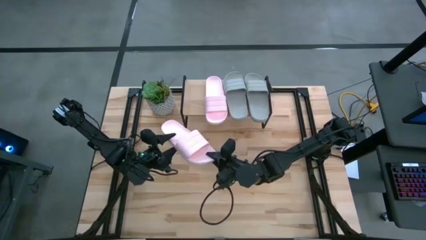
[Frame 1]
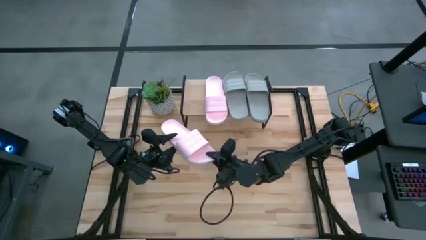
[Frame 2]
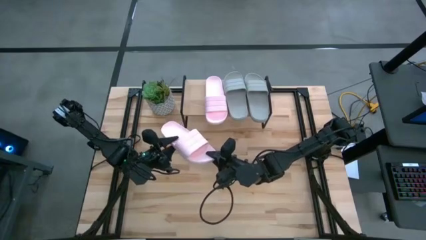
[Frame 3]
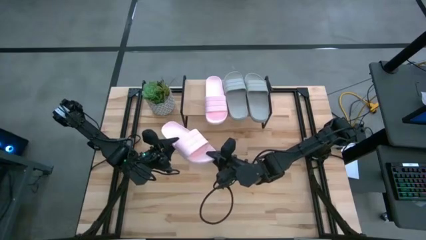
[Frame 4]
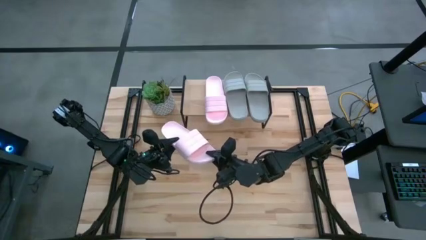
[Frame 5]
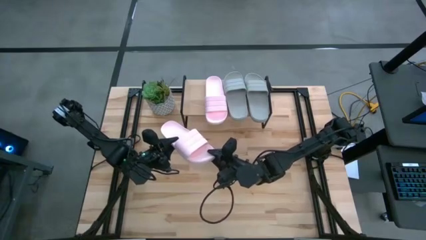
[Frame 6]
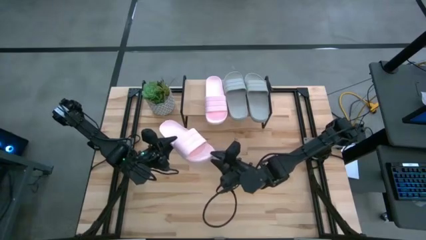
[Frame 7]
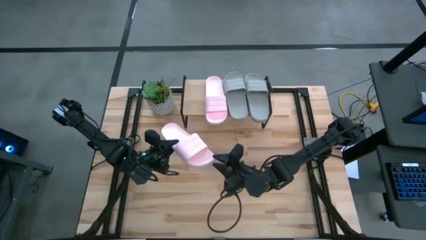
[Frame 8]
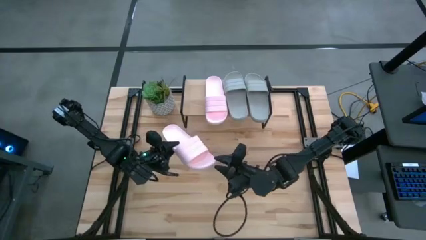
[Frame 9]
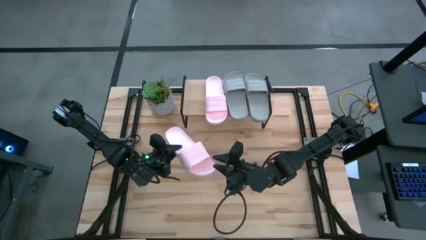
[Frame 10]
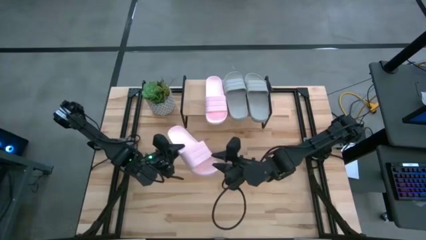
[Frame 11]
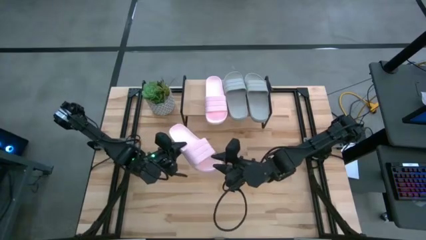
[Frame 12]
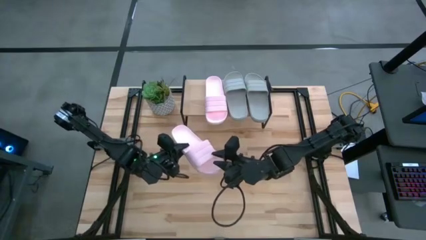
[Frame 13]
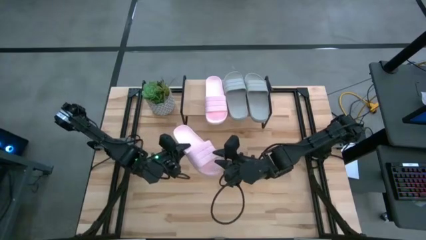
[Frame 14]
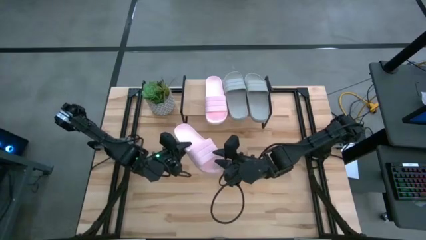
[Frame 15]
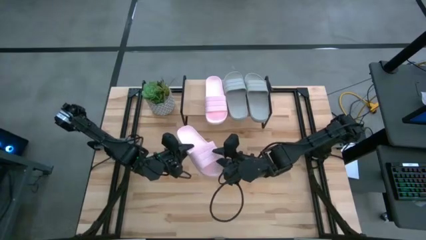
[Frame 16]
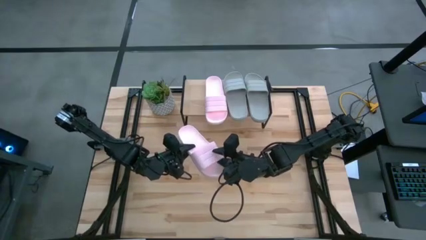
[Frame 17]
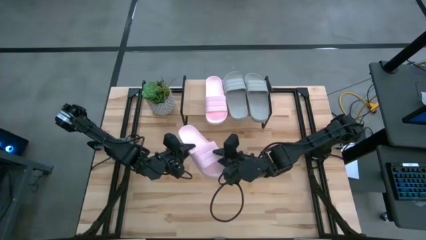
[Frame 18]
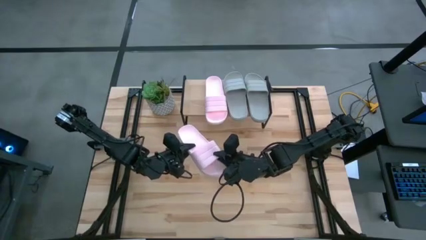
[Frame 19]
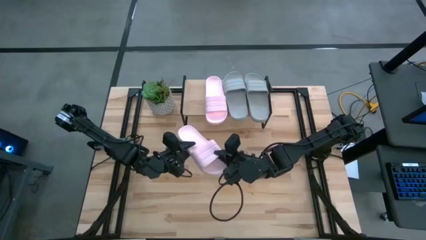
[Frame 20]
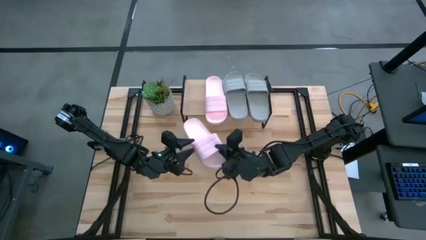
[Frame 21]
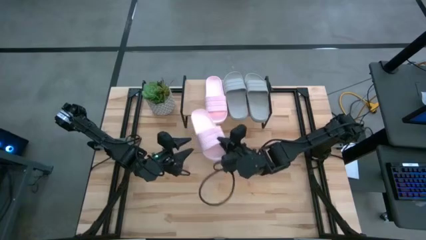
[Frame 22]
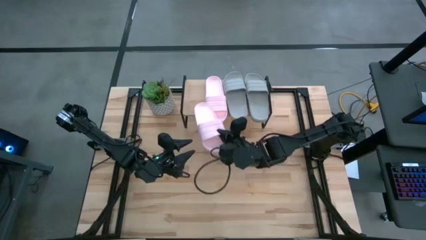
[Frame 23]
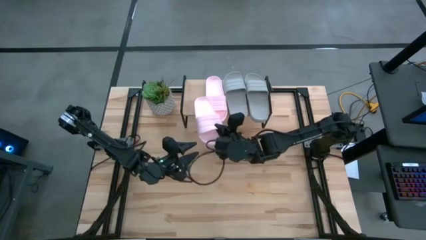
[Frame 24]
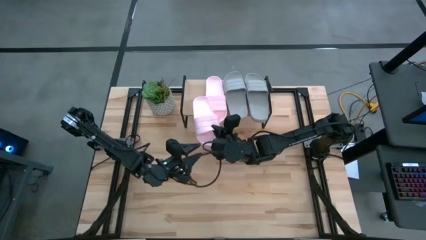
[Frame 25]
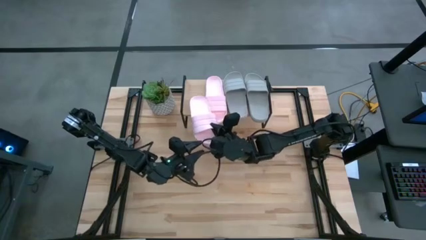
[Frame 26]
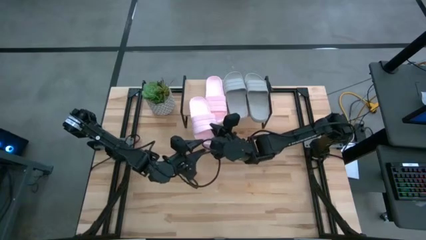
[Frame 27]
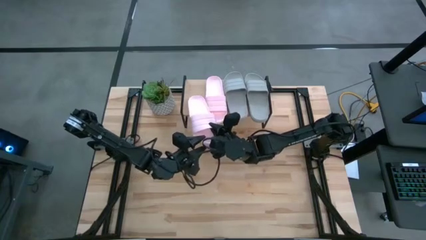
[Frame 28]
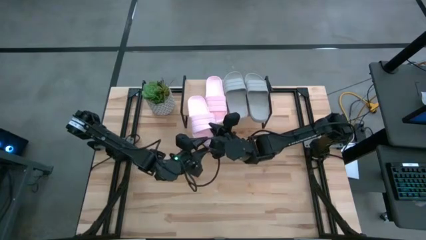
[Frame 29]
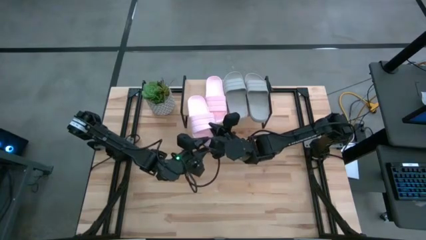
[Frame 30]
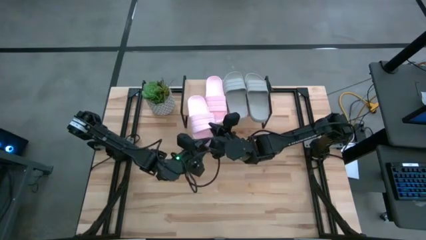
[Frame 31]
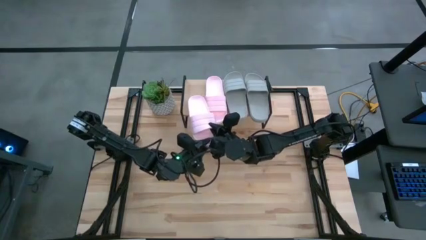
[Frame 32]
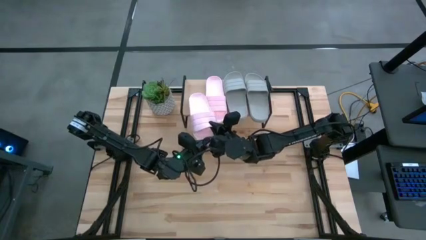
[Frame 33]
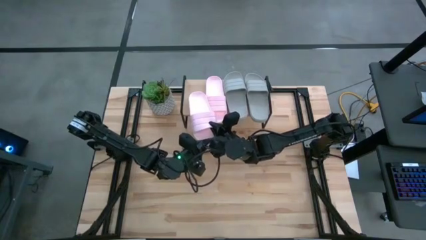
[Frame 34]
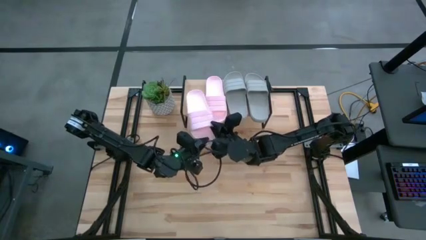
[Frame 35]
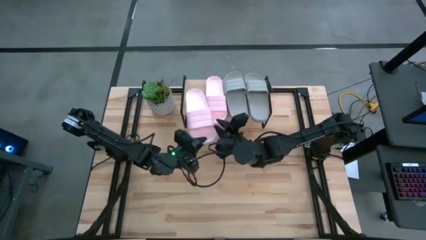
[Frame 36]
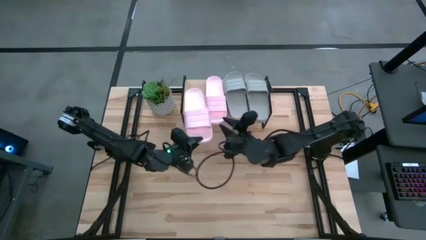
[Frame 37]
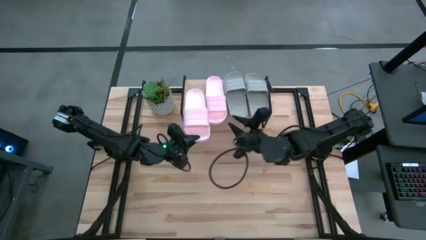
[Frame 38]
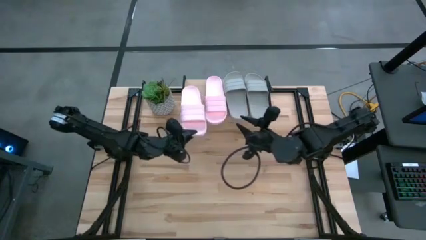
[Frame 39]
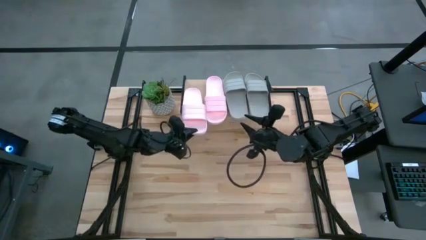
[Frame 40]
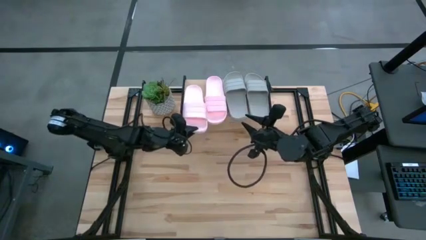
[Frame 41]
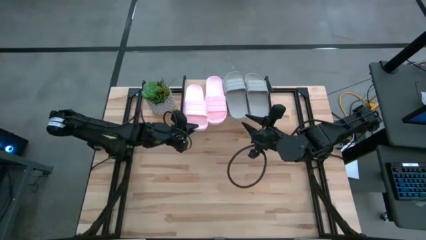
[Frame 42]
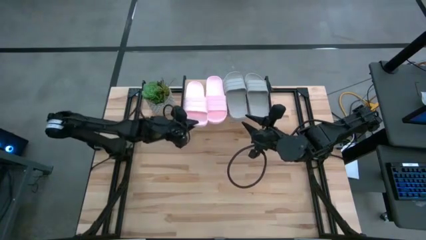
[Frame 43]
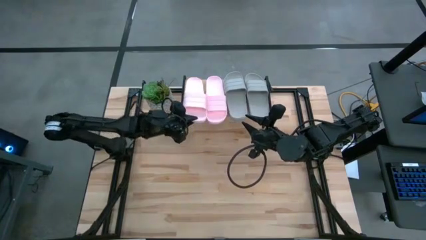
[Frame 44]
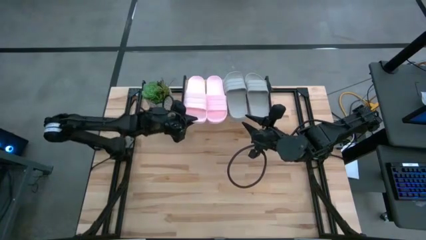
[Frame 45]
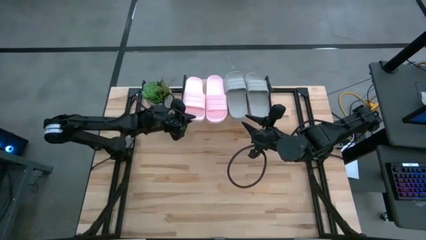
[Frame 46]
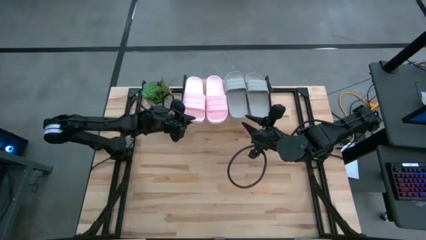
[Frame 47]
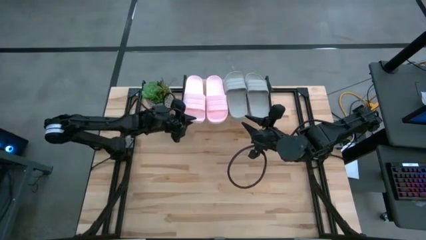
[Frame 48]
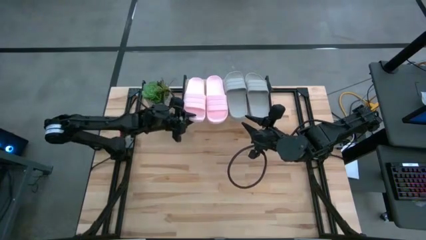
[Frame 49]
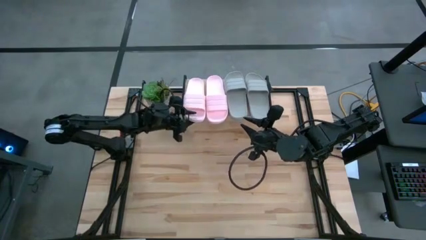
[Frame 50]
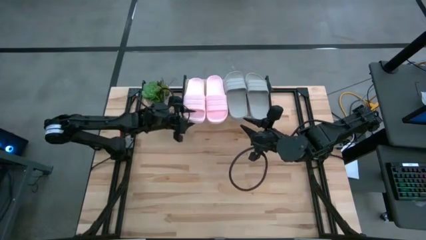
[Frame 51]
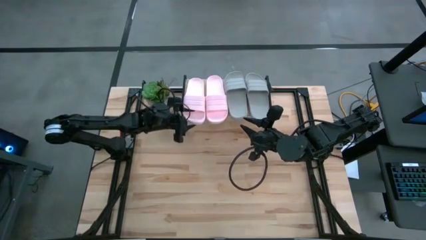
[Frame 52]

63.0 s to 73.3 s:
Task: Pick and place slides into the shelf
Put the pink slides on the shelf

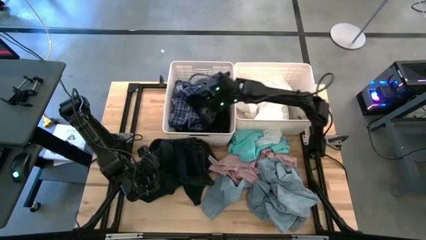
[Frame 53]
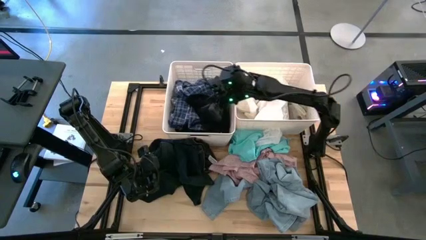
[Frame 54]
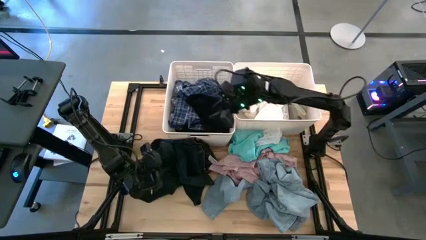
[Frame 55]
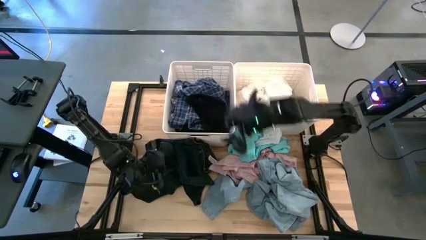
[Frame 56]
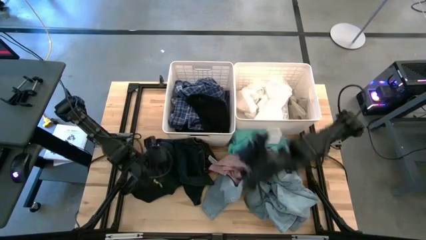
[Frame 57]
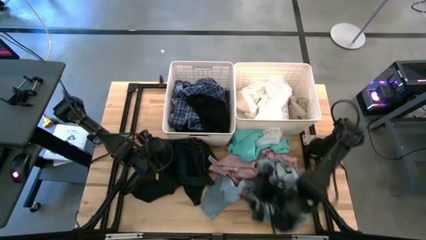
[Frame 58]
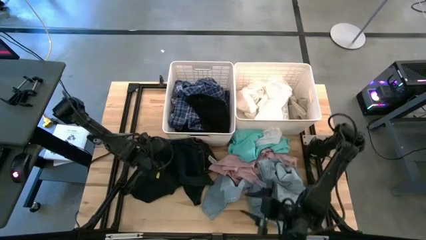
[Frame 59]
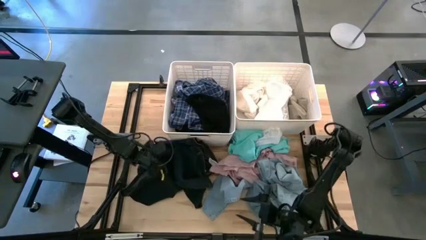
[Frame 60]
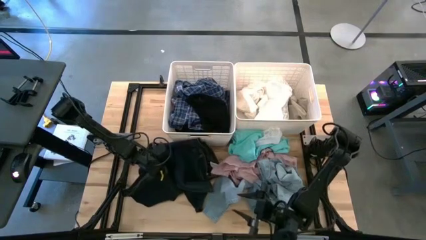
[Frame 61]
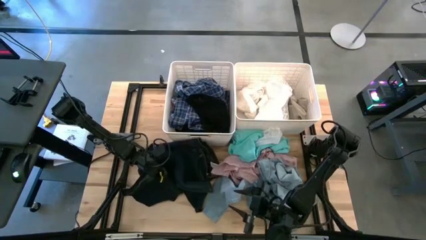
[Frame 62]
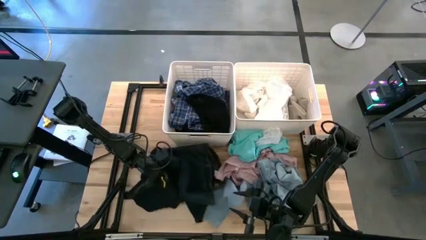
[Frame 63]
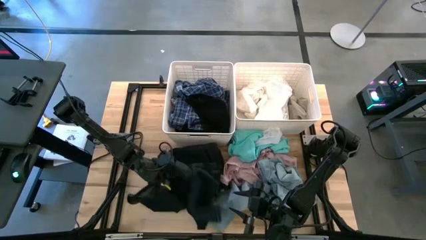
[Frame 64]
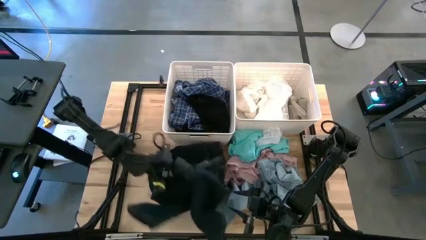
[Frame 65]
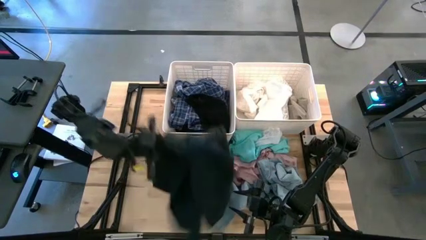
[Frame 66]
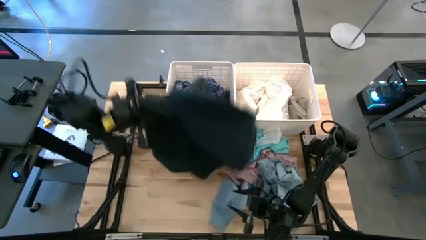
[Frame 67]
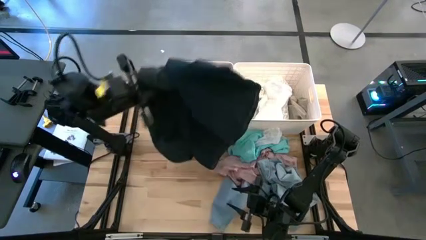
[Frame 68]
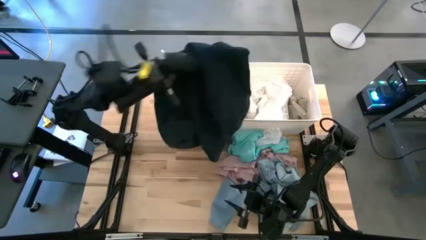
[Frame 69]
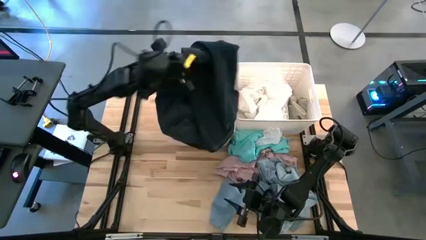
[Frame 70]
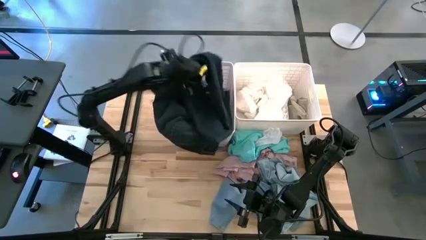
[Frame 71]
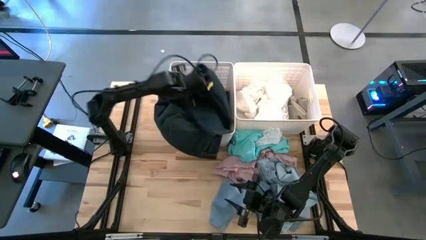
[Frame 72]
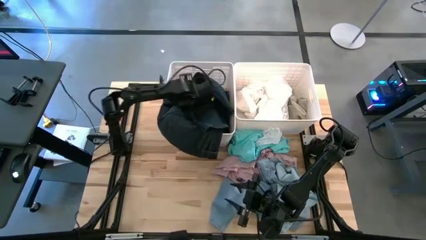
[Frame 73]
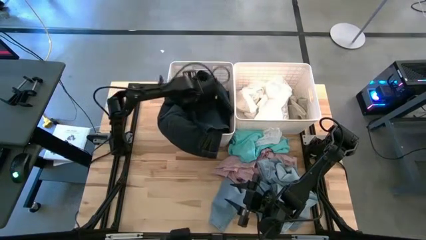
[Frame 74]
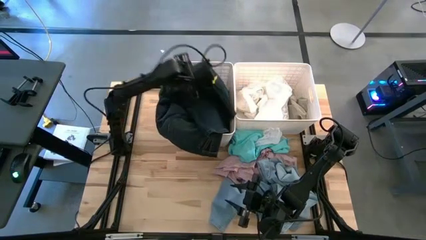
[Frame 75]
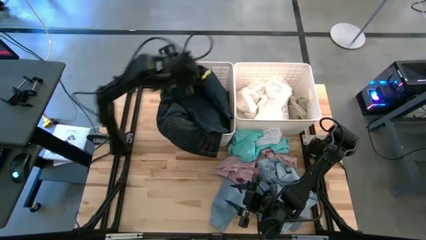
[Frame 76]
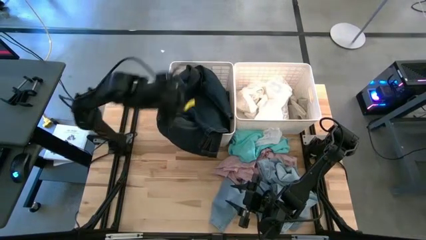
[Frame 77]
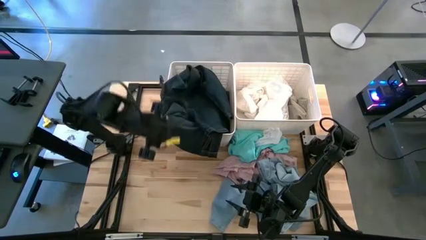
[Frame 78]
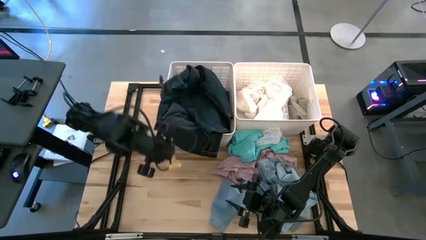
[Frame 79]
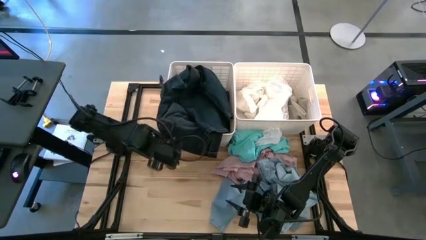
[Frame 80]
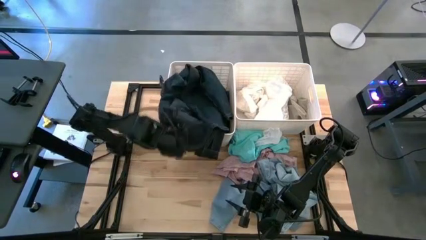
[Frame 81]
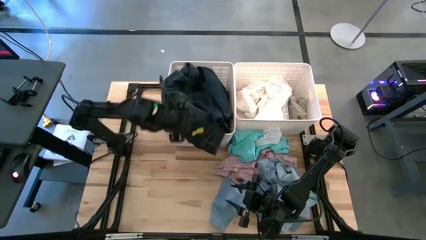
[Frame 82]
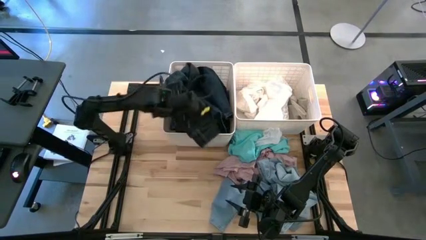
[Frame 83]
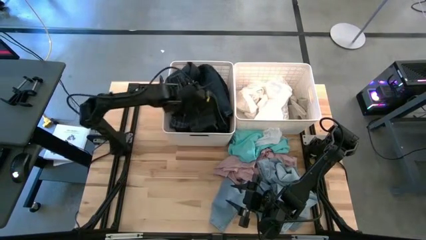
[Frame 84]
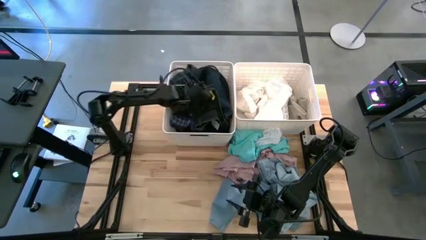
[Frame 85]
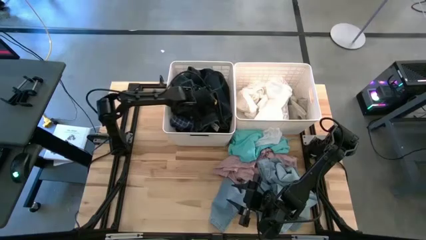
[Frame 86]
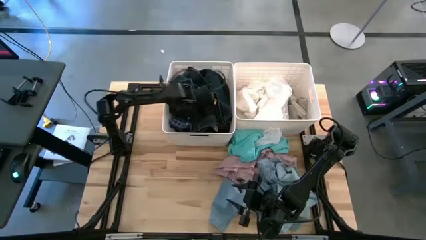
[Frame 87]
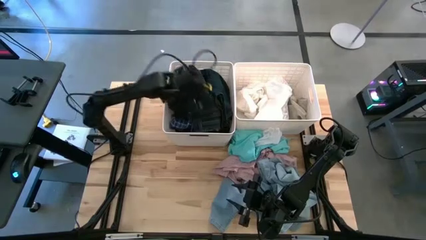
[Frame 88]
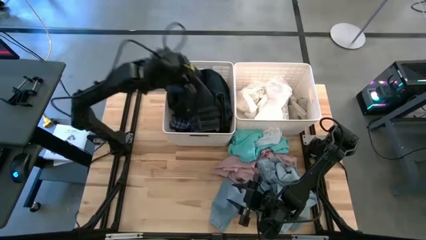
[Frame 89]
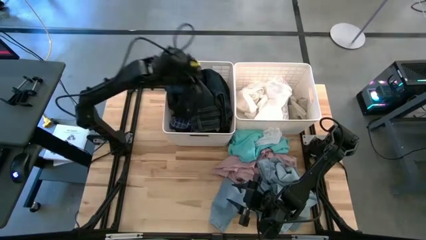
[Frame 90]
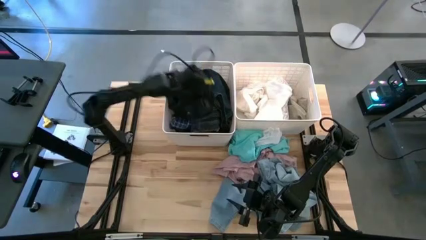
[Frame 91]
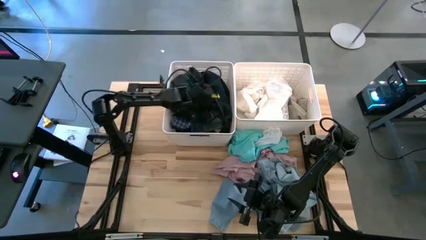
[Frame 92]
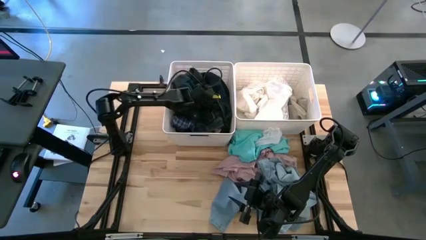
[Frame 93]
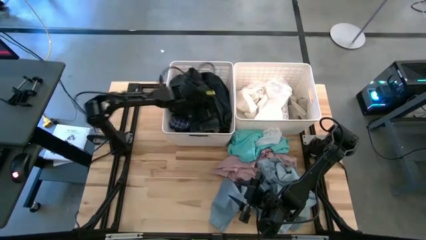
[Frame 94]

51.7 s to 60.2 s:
Task: Sort clothes
Put the dark blue pants into the left white bin
